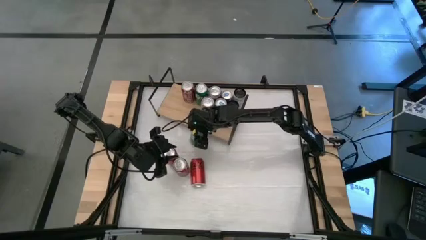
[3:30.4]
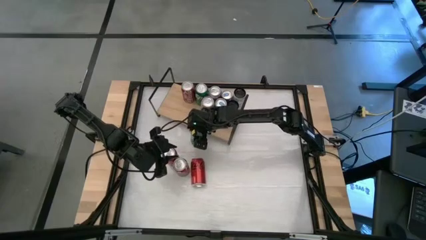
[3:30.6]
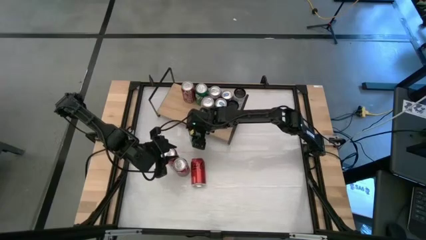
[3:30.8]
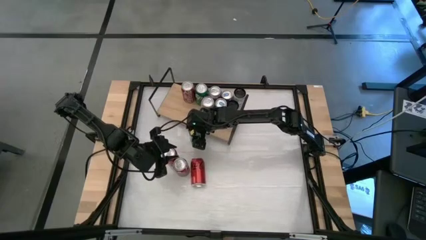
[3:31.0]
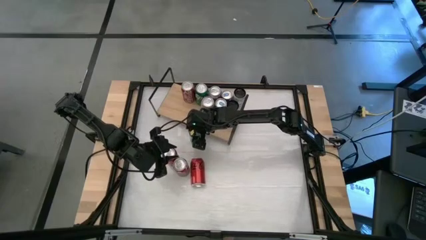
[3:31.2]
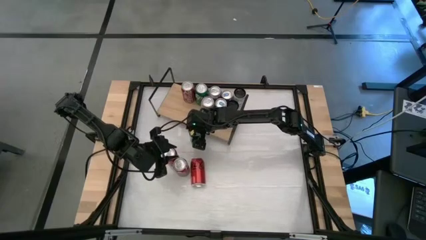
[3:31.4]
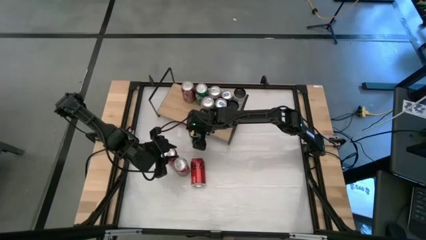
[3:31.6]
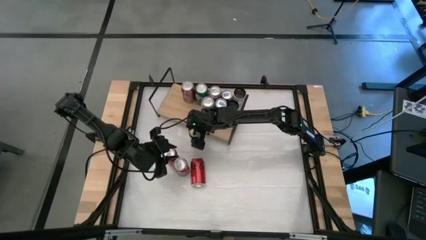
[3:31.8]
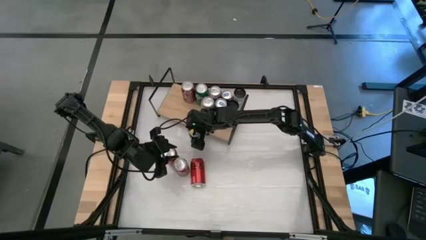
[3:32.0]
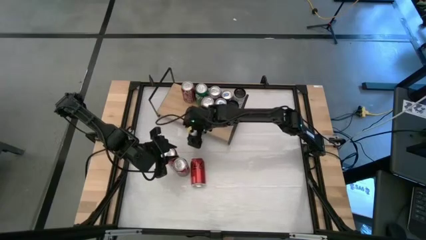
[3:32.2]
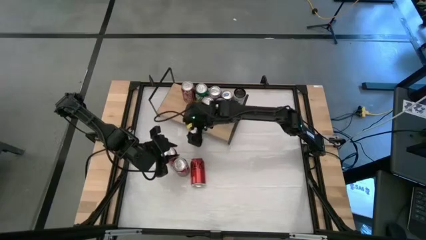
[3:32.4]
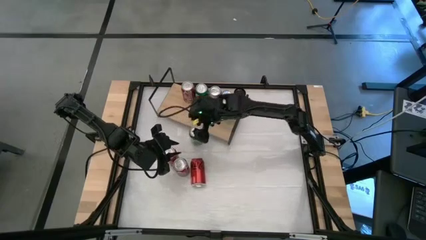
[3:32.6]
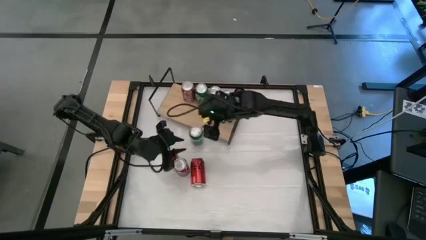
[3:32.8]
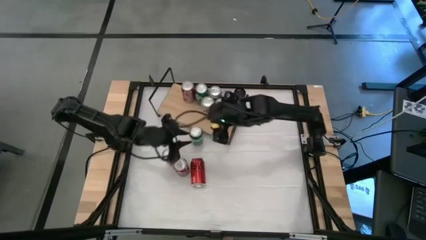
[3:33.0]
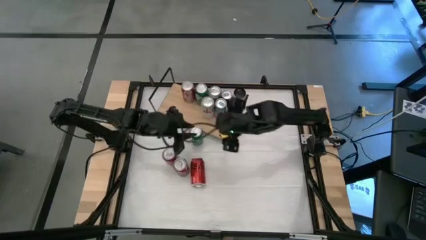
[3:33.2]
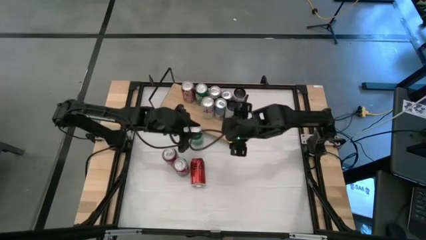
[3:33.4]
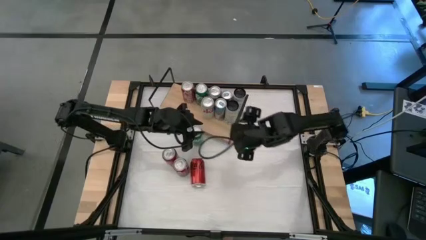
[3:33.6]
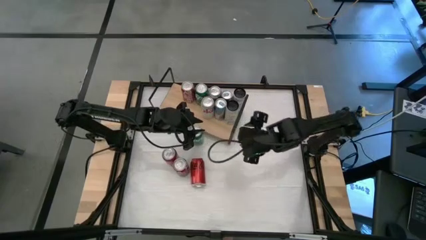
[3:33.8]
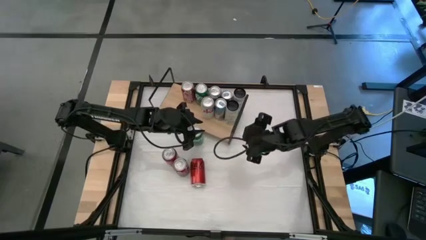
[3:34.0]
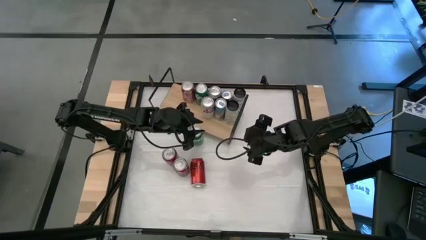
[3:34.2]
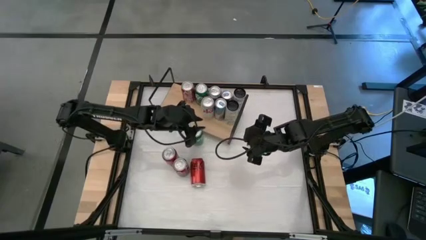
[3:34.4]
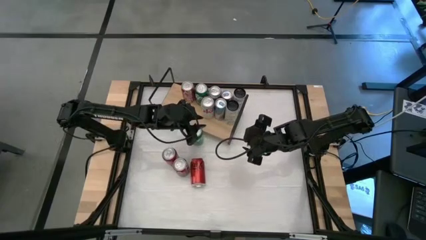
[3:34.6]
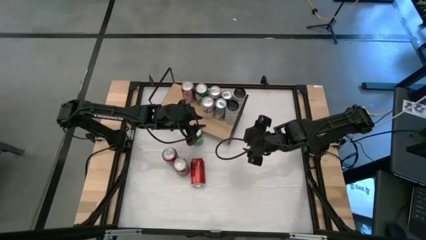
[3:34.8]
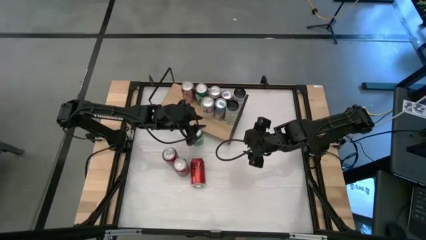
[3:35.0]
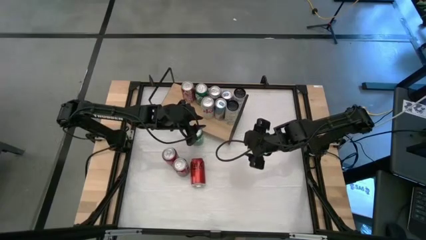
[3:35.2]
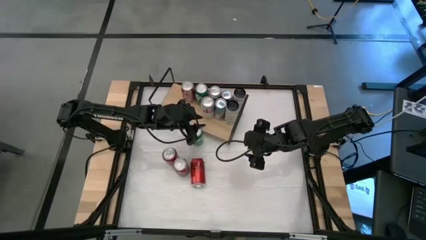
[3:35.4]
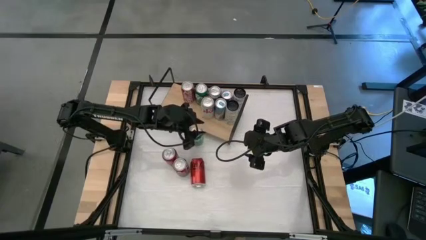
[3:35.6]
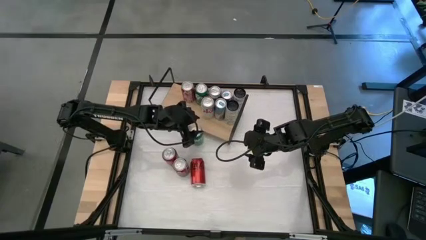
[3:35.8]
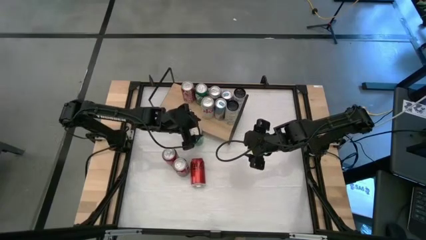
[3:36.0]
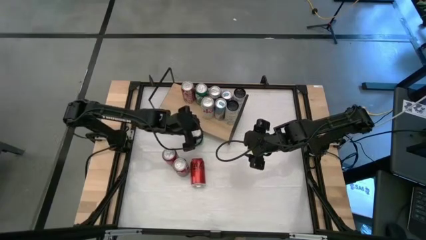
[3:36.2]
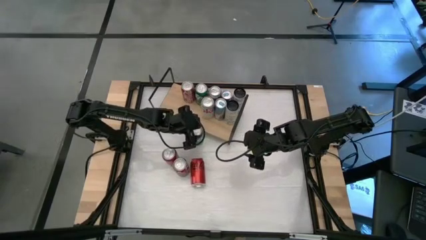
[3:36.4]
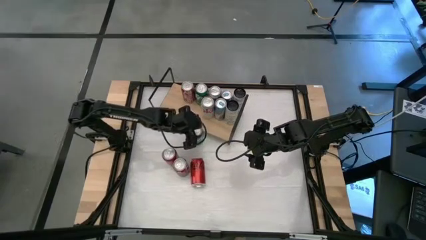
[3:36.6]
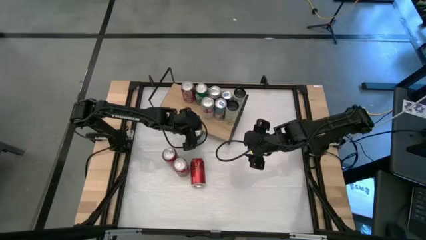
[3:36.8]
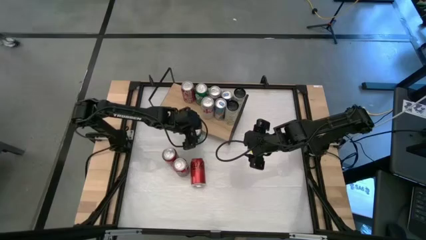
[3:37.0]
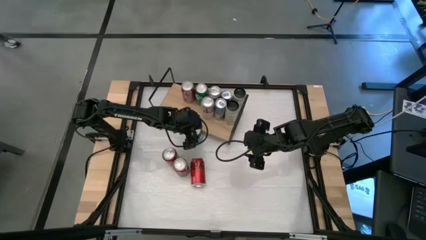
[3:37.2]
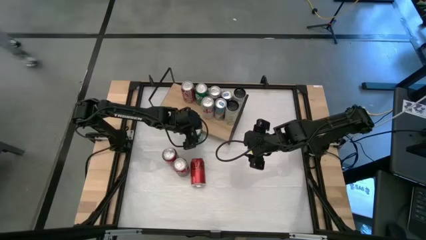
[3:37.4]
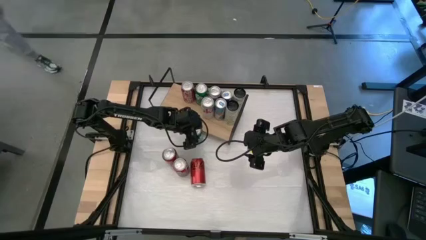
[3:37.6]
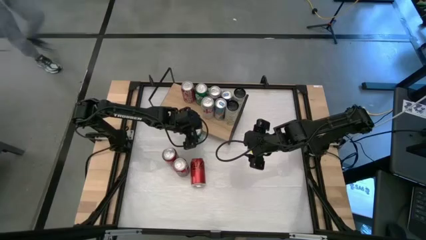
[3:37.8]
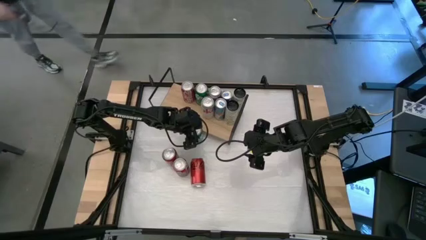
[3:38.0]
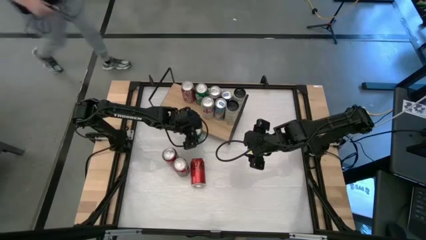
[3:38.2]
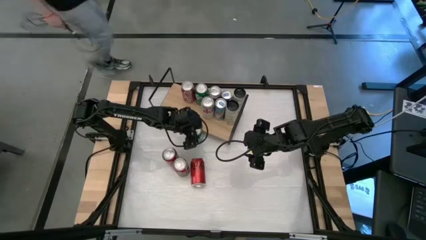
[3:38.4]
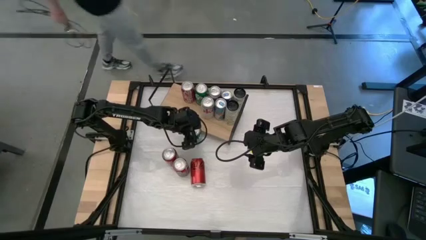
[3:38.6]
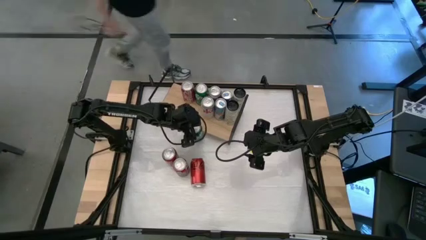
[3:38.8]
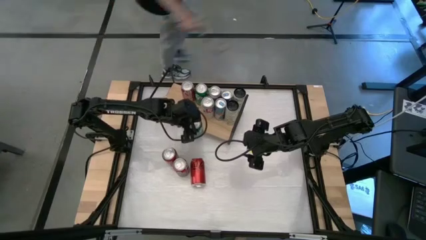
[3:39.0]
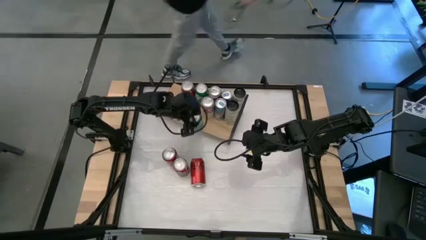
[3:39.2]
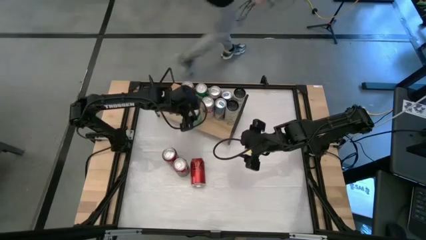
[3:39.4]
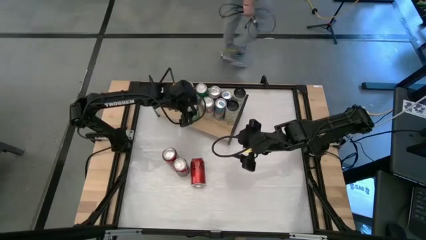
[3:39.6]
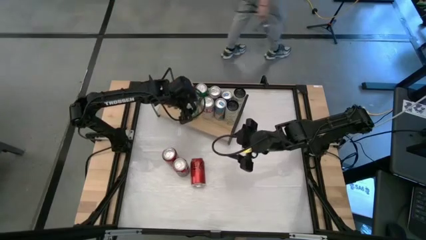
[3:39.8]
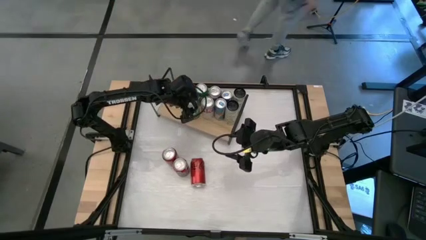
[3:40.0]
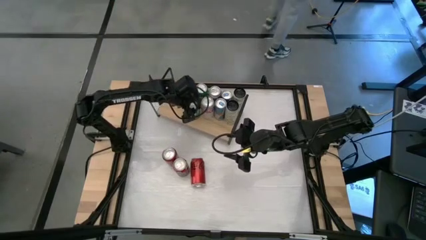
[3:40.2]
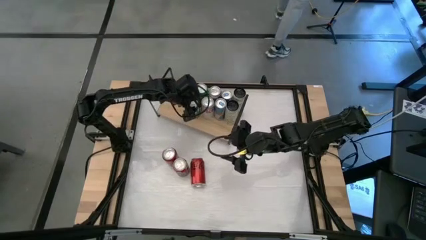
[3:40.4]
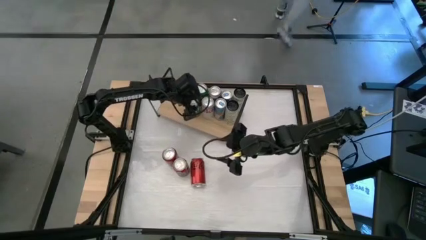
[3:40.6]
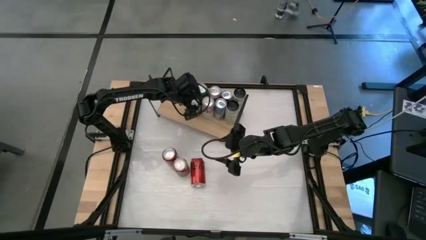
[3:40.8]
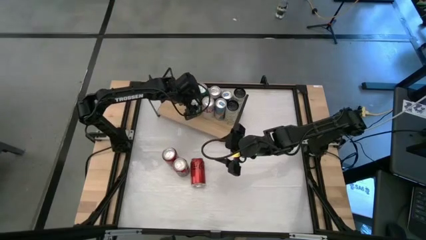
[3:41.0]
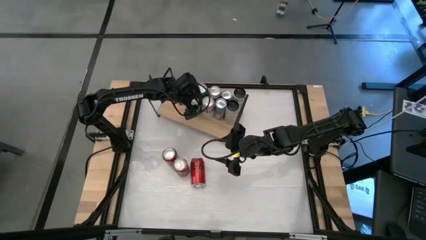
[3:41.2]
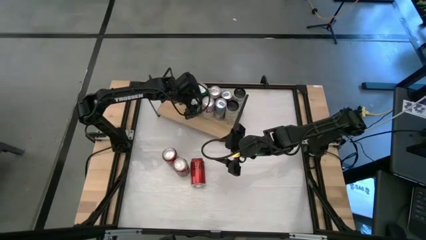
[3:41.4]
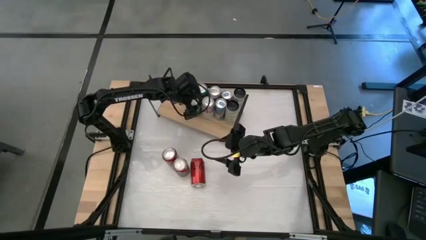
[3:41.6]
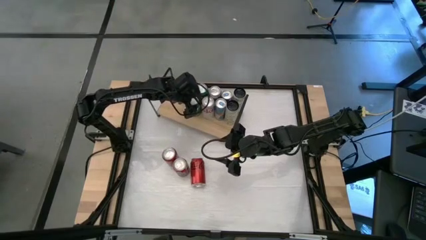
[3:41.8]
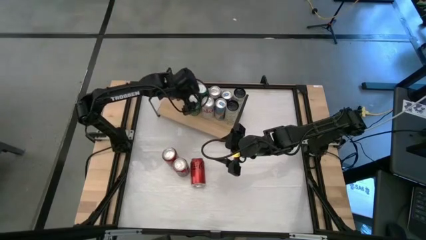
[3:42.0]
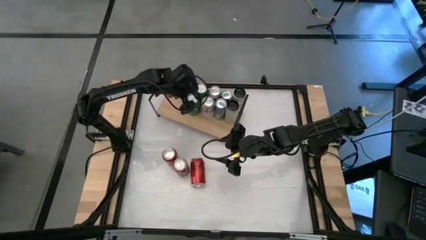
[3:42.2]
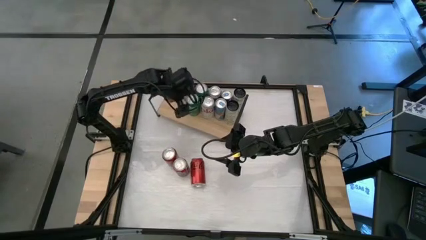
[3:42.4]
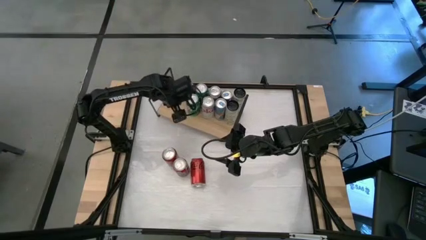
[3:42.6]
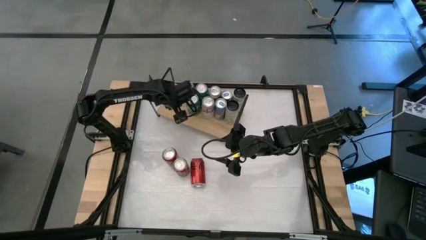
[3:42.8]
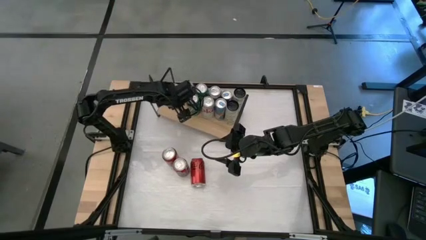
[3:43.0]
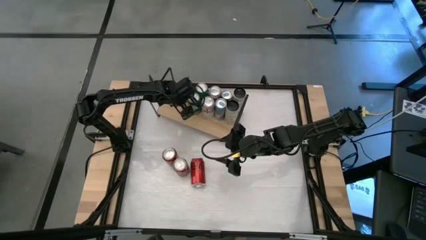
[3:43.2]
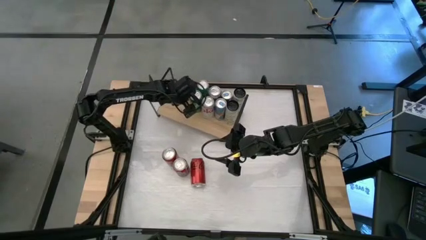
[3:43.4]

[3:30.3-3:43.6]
Task: Place canned beverage on shelf
Put the green soda can on the shelf aligned with the other green soda can

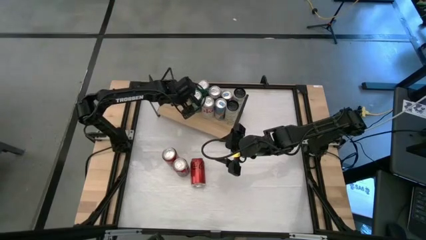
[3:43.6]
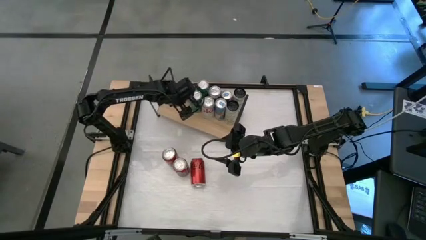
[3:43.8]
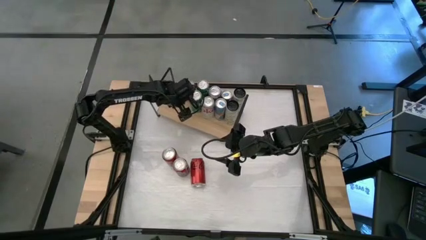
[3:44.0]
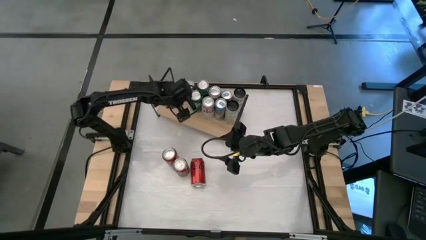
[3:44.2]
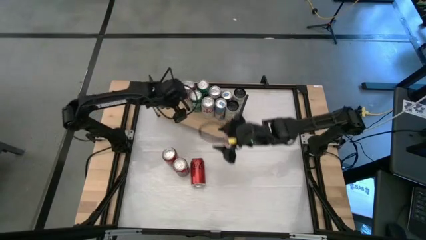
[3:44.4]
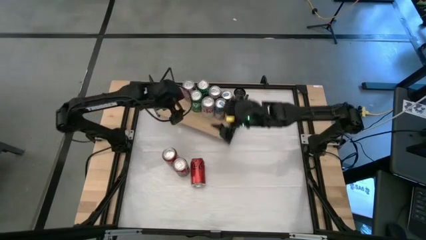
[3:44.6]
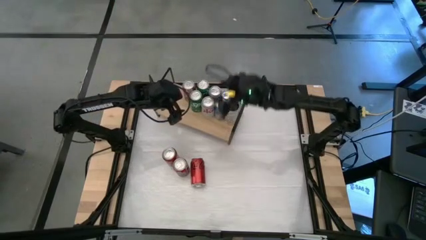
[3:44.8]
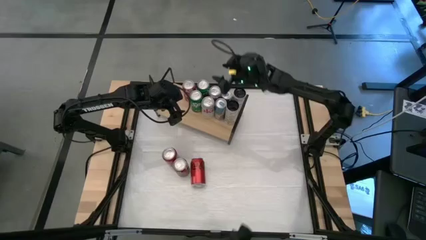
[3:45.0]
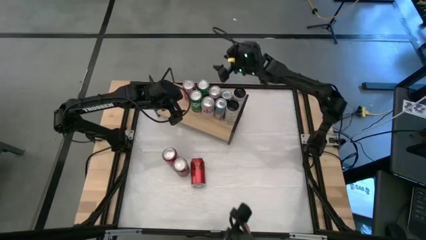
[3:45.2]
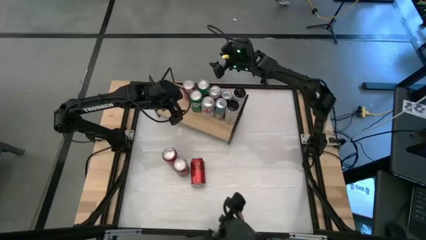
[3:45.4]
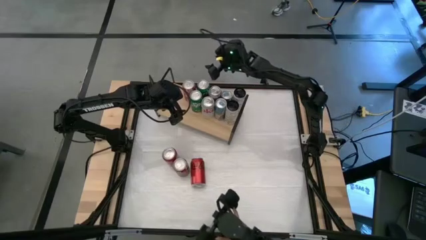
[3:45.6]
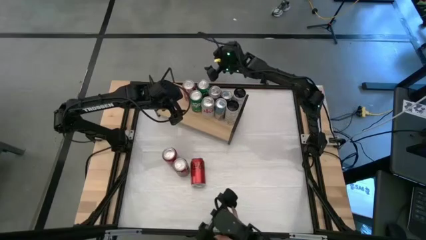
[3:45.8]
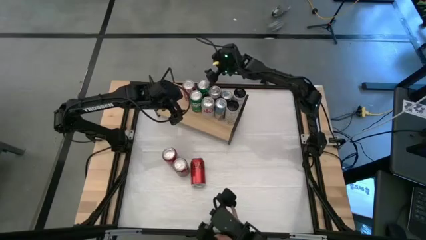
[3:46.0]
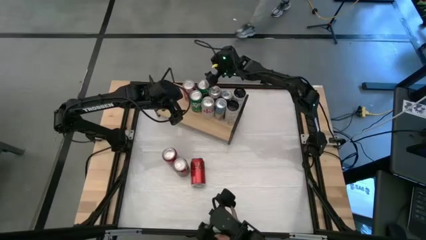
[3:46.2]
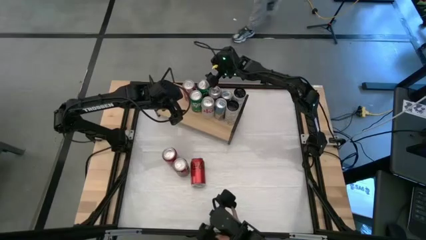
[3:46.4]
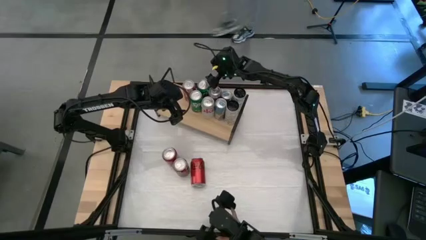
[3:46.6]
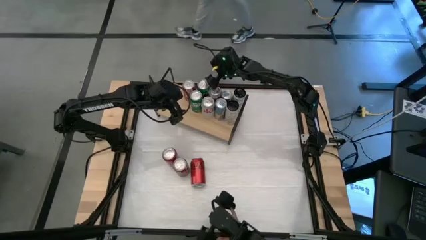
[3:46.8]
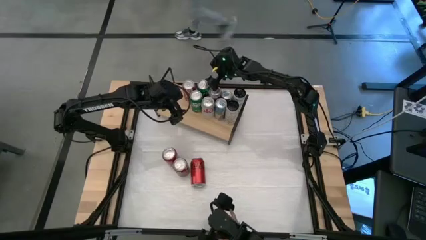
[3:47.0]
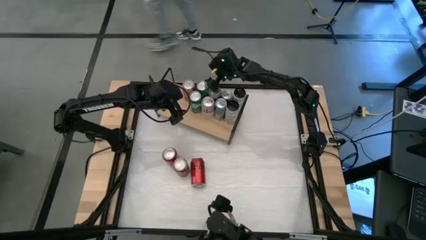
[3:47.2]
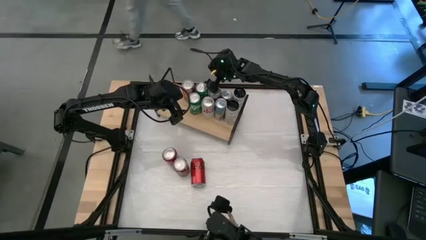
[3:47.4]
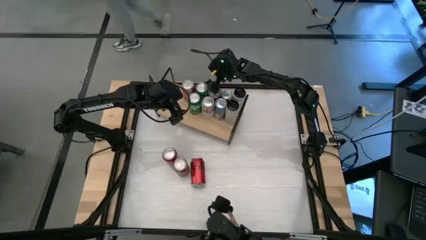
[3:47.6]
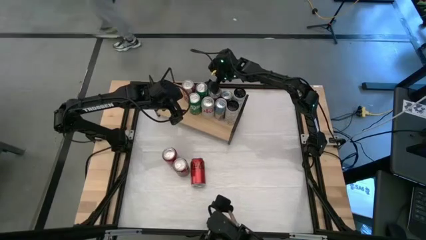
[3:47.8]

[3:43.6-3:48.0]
Adjust the green soda can on the shelf

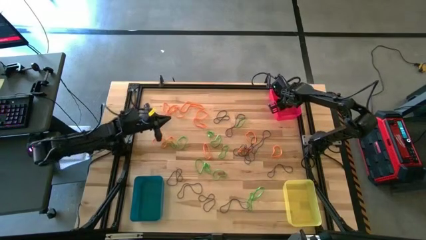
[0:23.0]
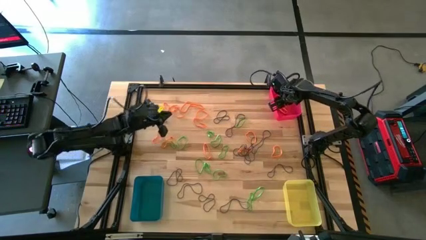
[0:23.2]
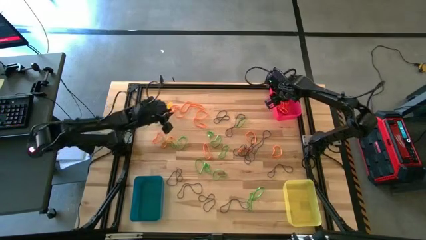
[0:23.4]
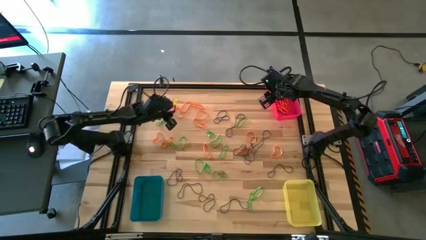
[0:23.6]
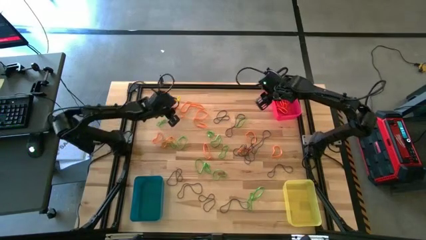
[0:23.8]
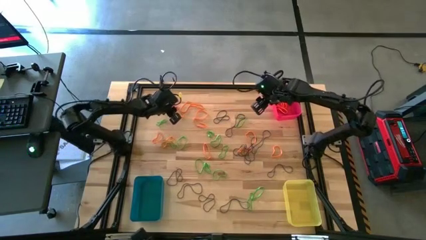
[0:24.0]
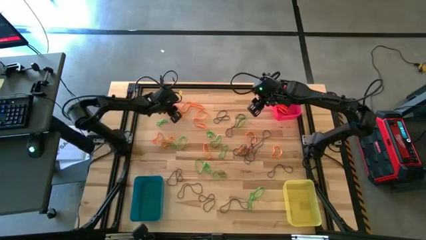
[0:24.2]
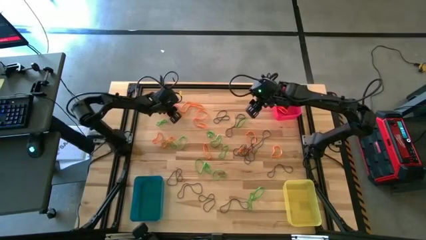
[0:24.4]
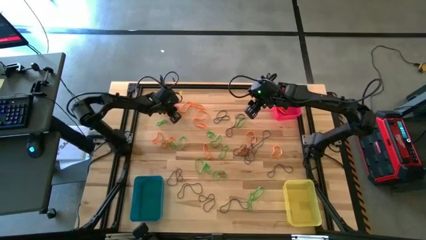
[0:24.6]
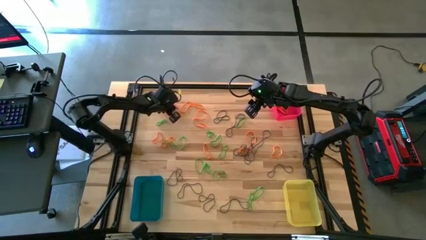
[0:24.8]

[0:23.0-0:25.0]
Task: Sort rubber bands into baskets
Put the orange rubber band into the red bin
